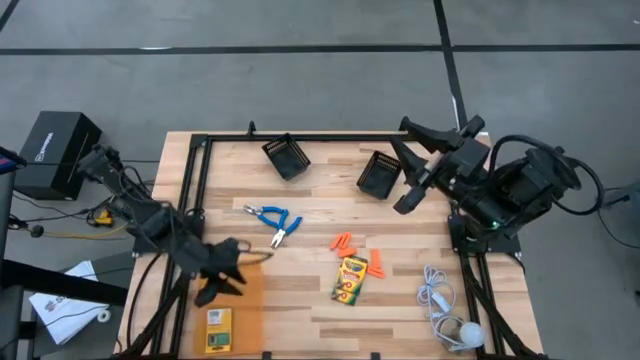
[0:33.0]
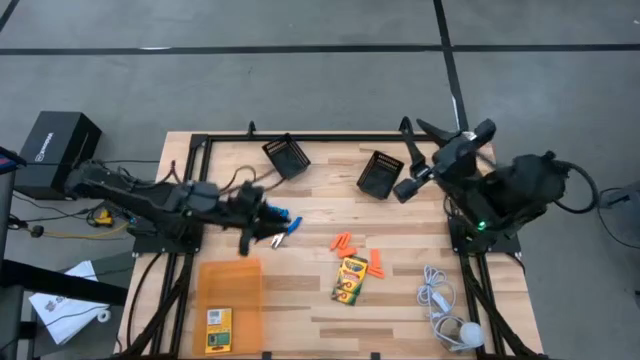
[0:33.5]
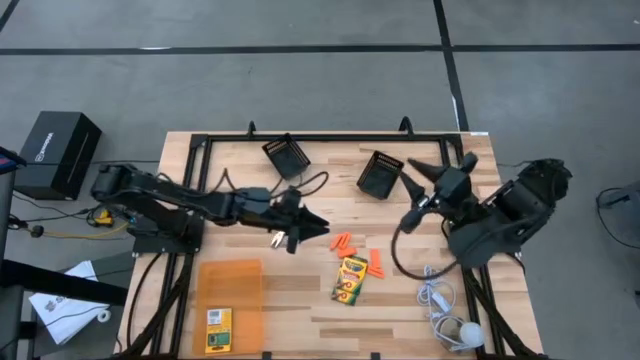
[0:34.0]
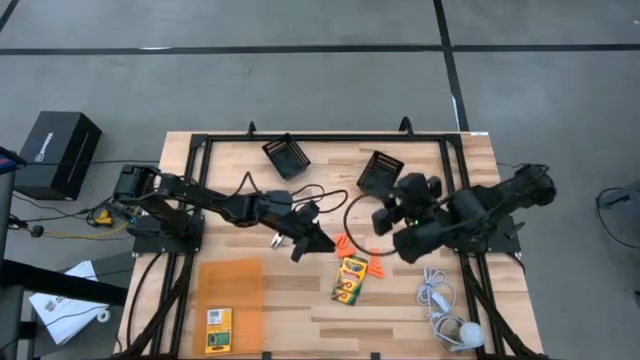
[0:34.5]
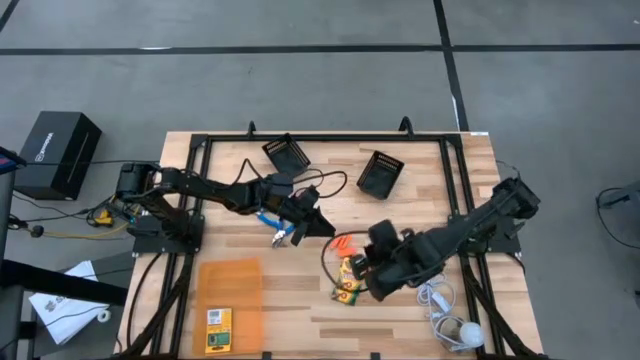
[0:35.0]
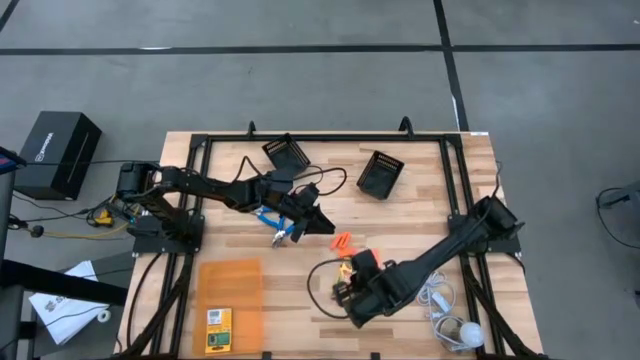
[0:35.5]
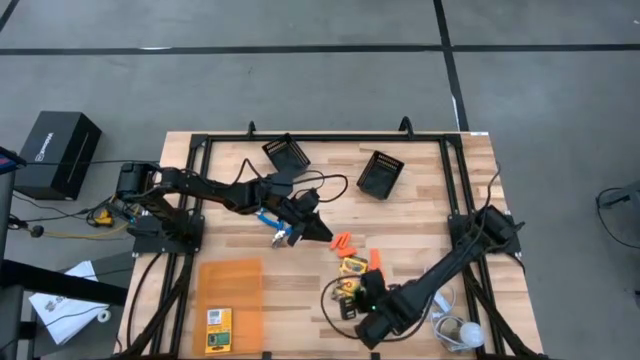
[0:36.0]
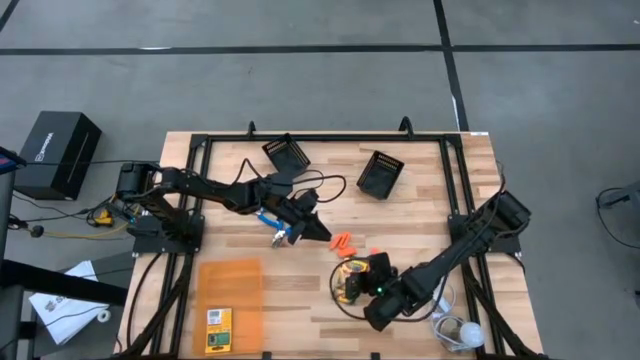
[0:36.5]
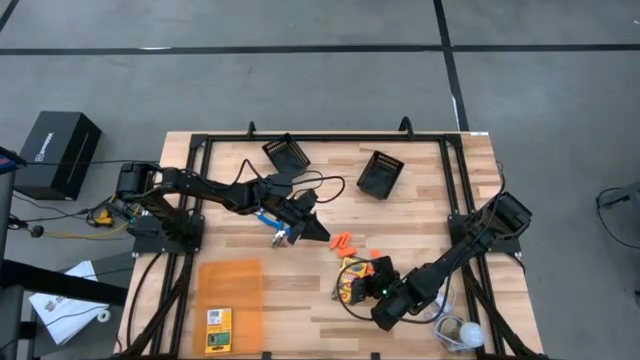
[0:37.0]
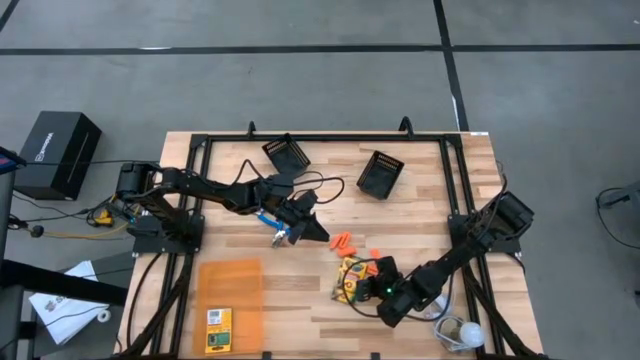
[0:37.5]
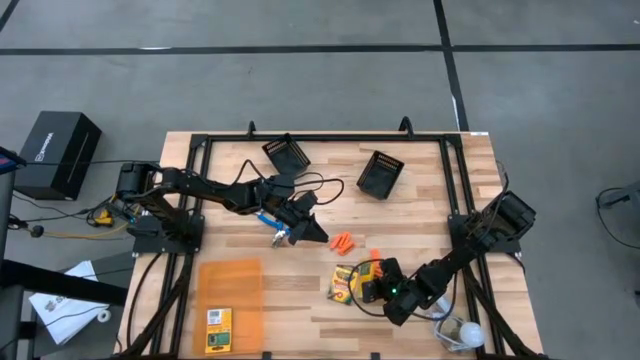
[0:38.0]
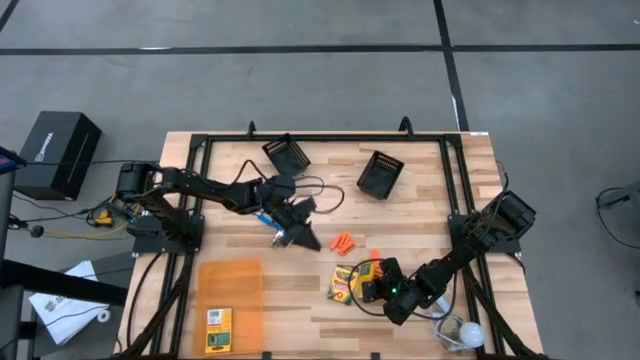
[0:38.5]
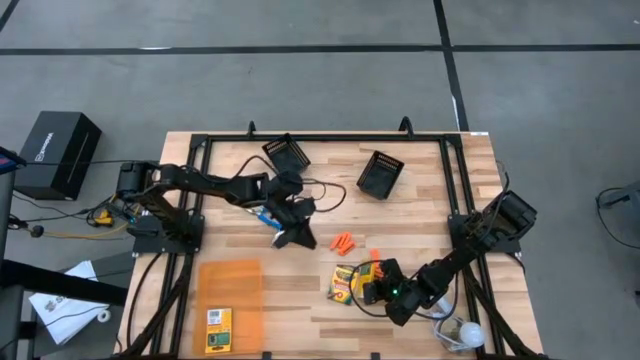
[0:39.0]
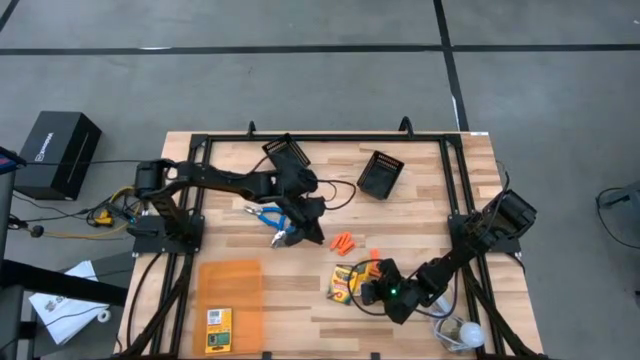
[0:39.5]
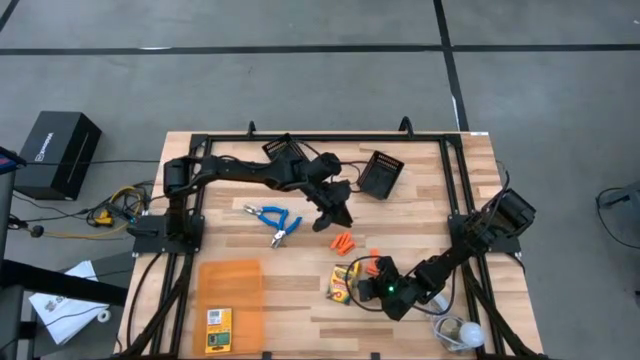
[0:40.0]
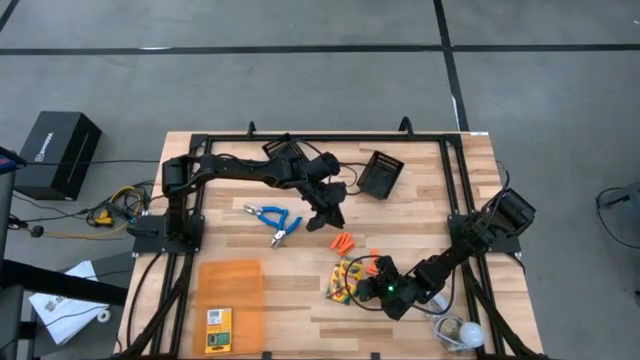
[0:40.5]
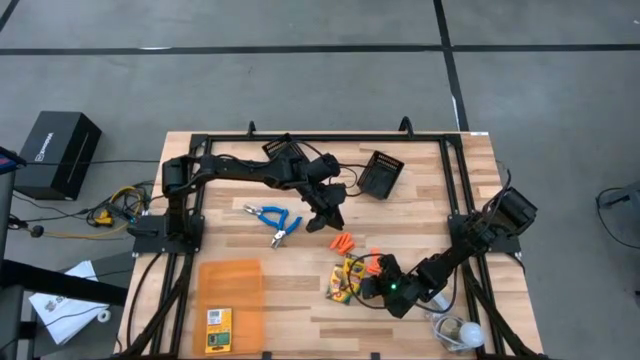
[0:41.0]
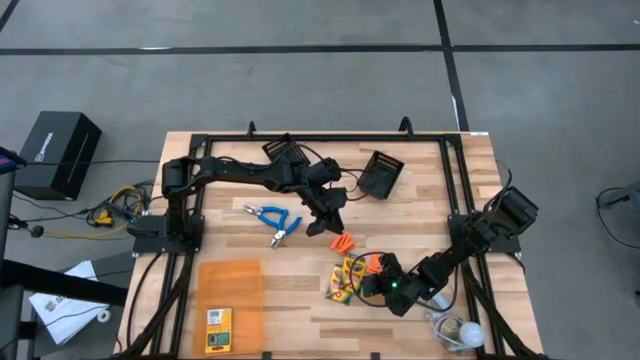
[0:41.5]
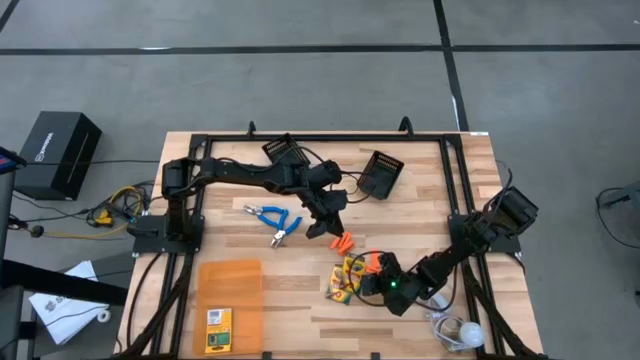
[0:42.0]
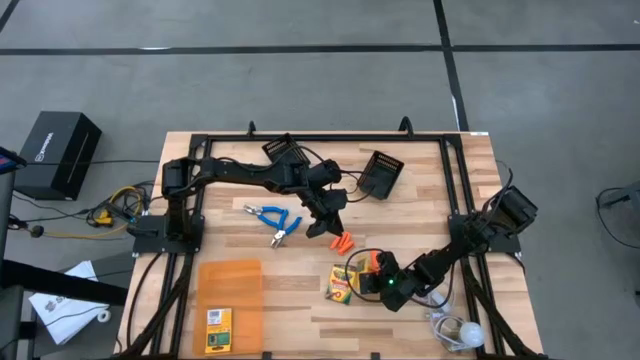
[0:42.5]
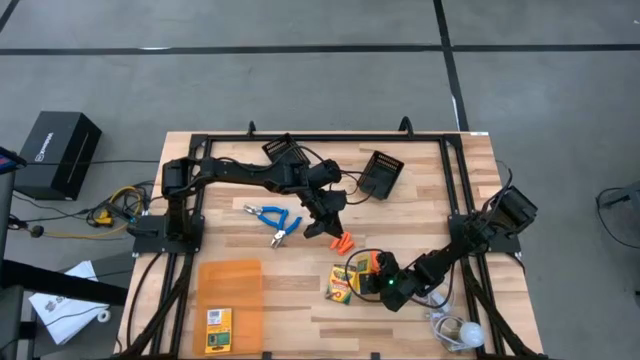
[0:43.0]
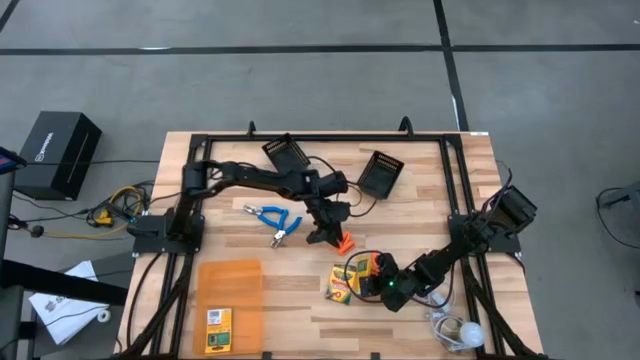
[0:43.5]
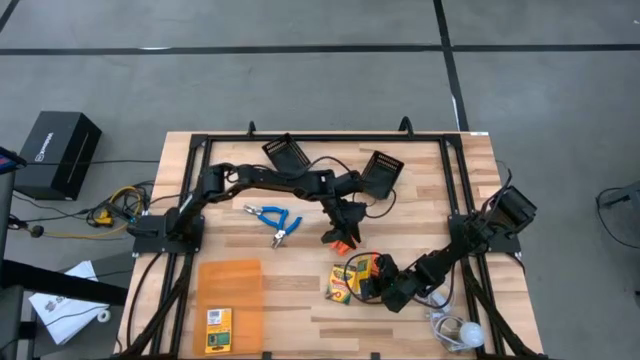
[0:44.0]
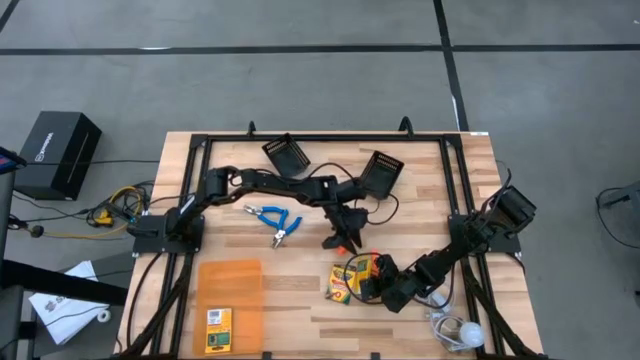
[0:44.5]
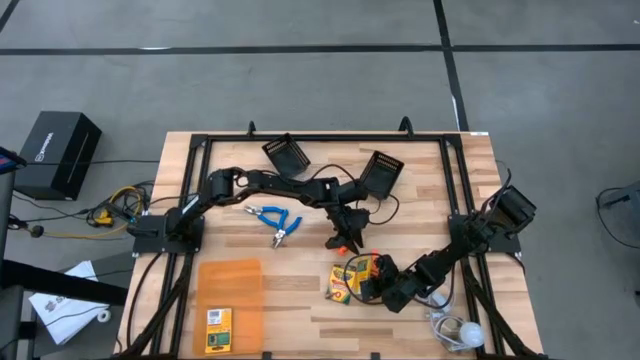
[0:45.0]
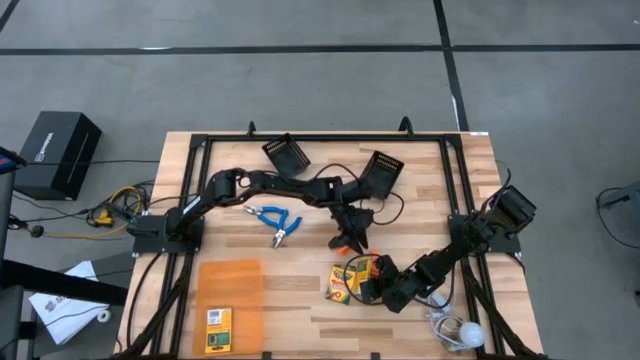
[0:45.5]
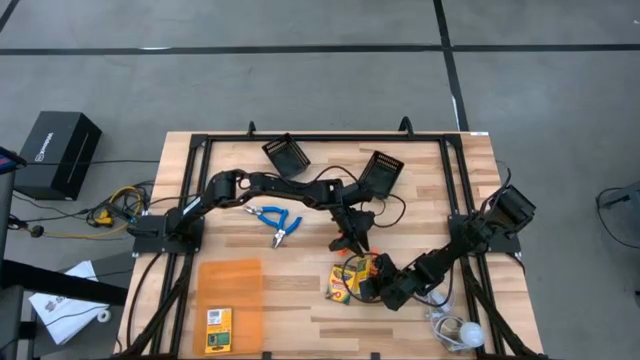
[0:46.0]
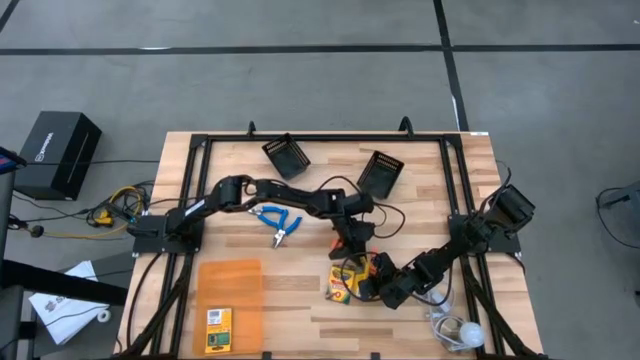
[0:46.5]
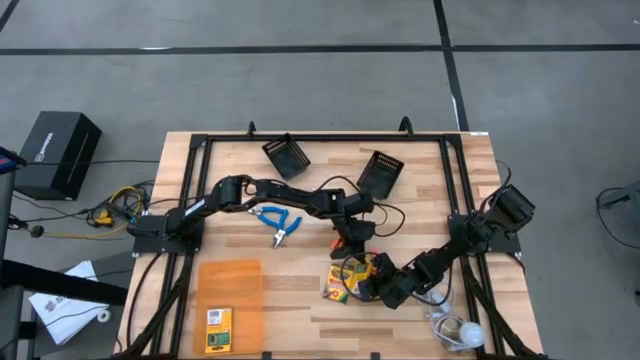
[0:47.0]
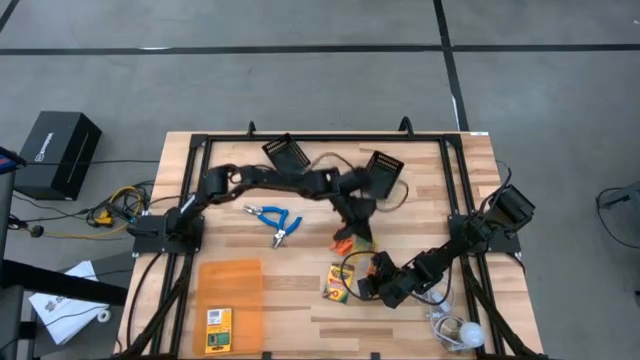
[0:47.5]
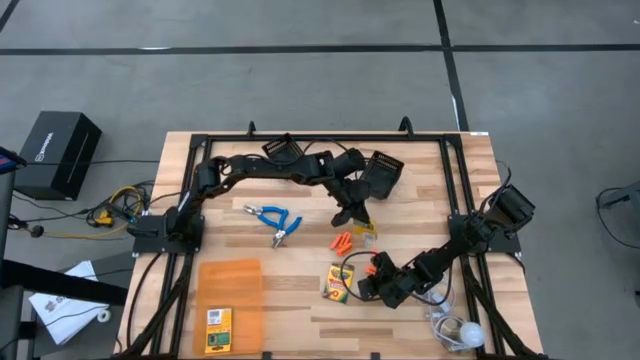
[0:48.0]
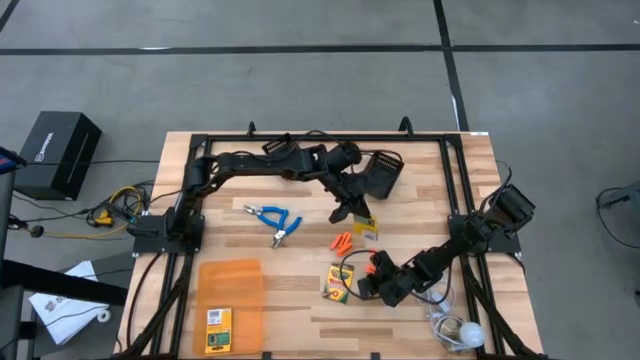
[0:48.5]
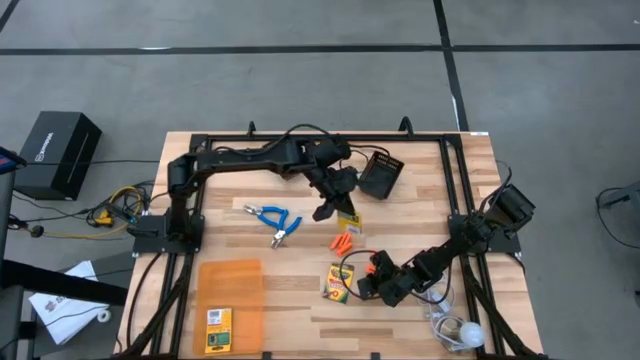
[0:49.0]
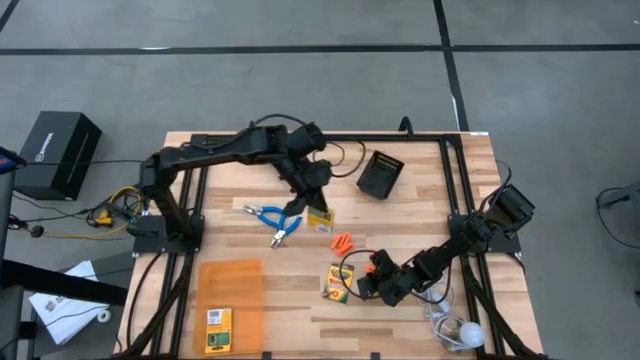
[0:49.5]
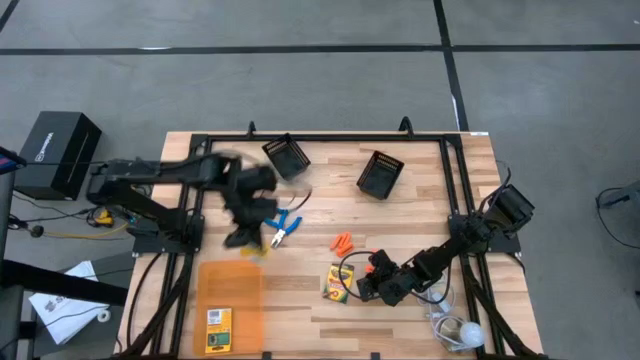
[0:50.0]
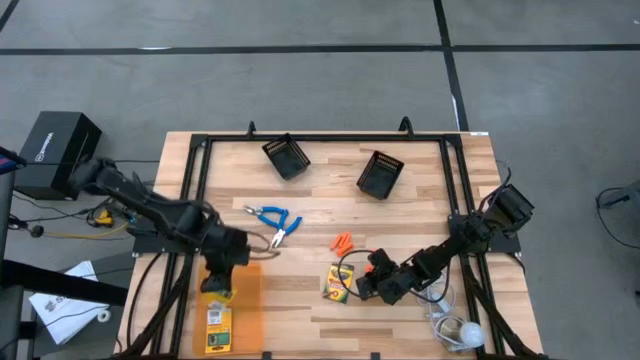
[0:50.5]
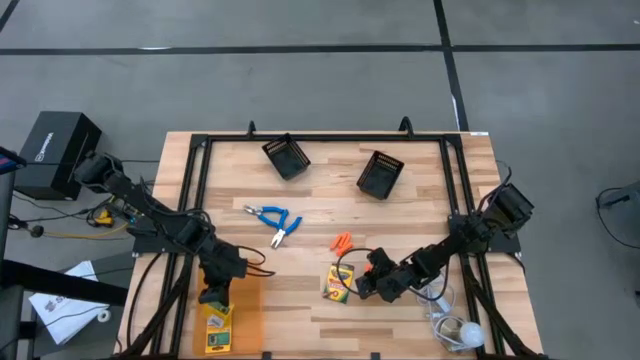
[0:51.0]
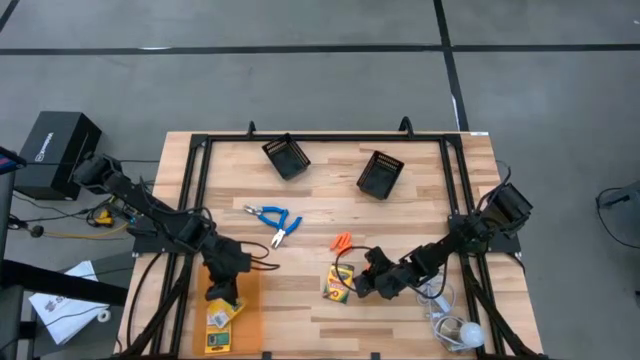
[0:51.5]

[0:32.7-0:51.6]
Task: Pick & Place School Supplies
Put the crayon box into the orange transparent bin

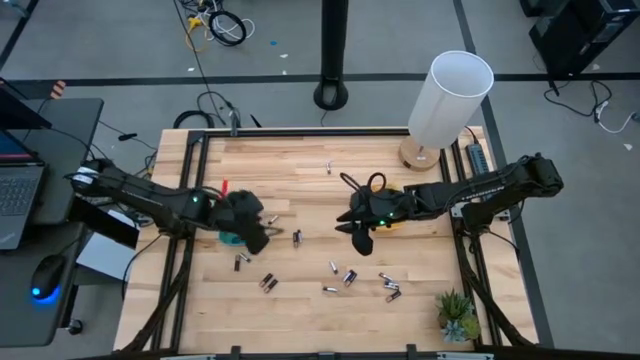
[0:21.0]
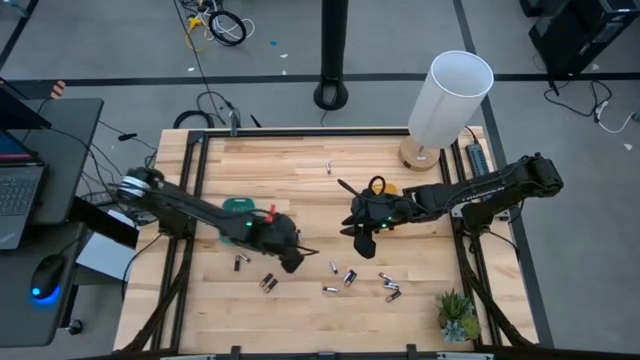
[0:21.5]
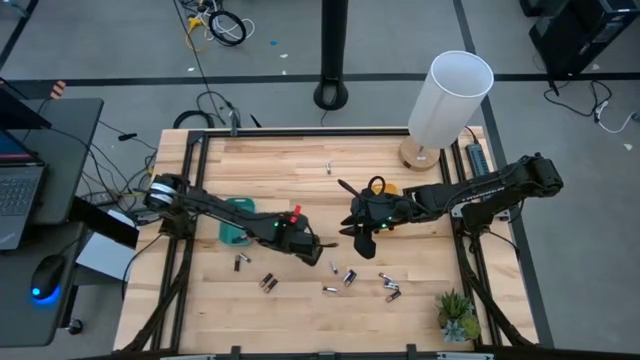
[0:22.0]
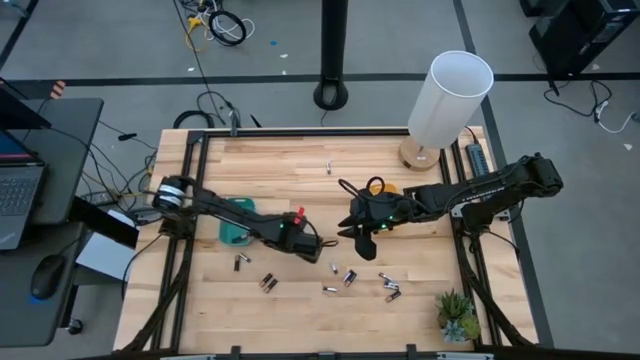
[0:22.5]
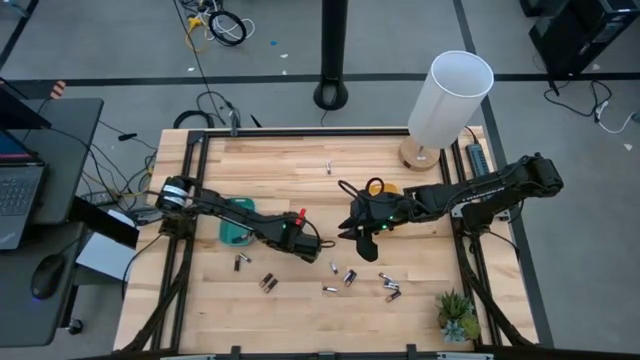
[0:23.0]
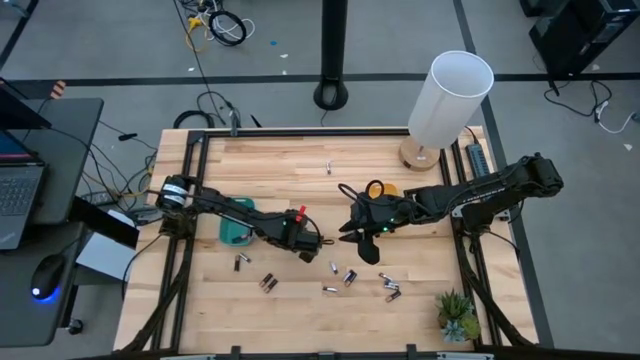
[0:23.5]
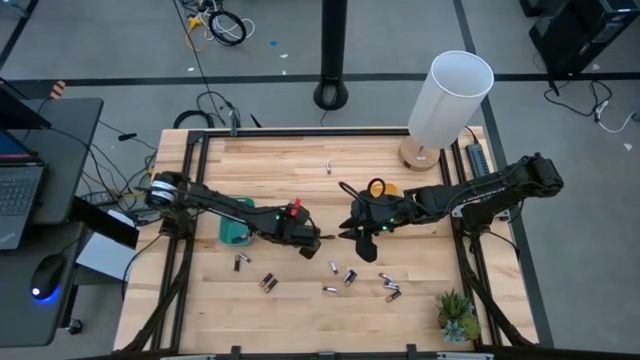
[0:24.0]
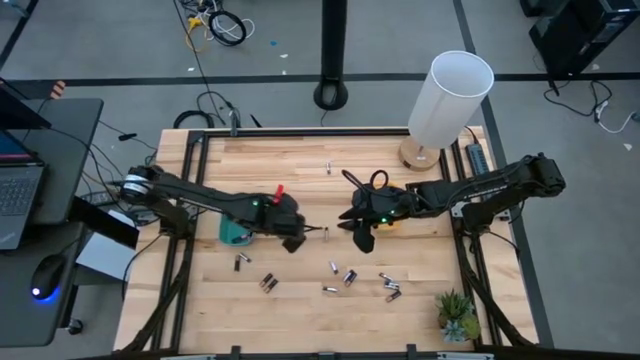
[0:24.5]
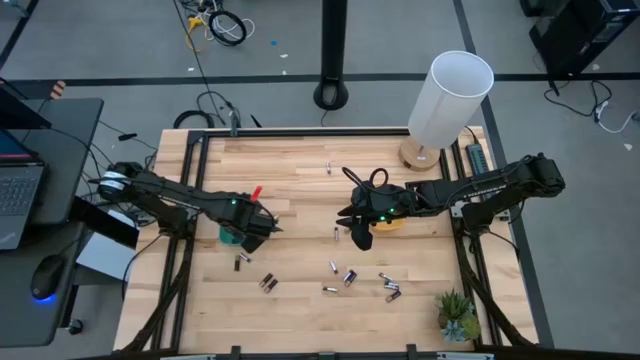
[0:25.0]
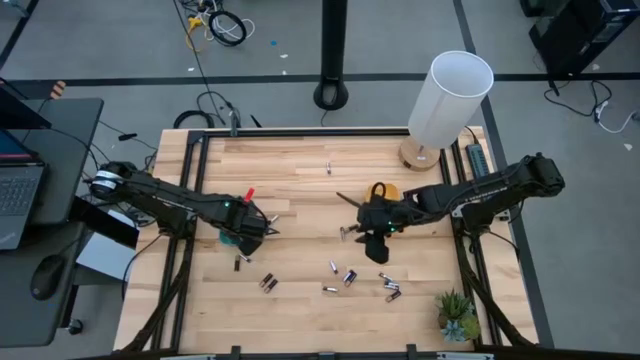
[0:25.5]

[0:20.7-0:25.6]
Task: Sort batteries
Put the black battery into the green bin
